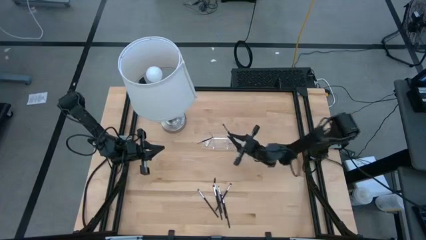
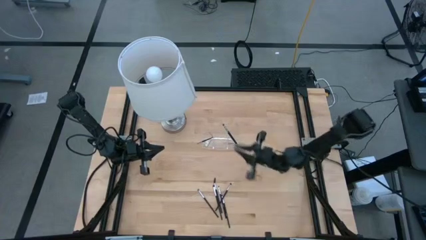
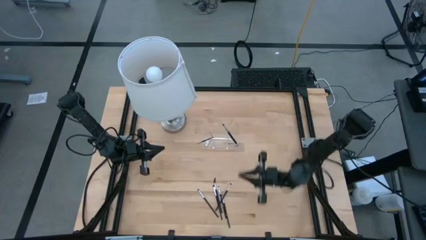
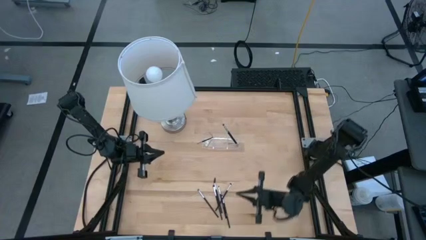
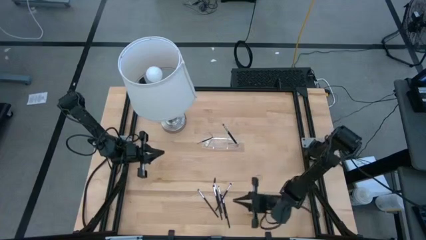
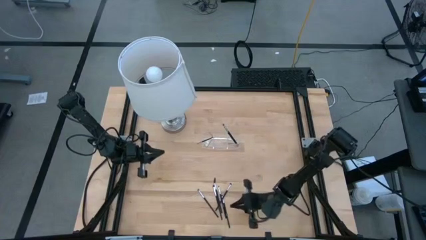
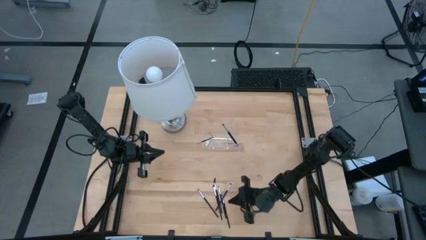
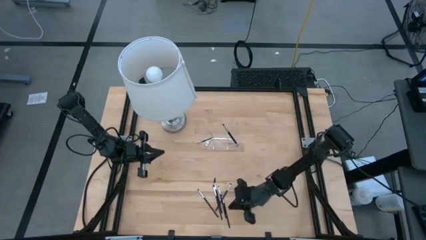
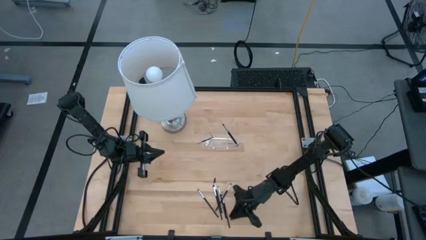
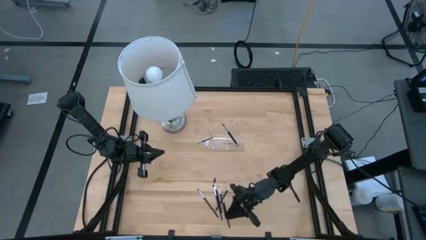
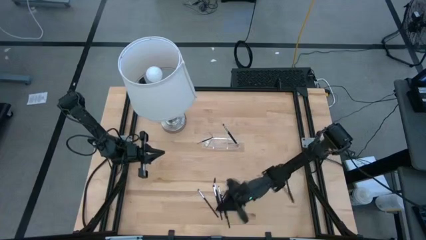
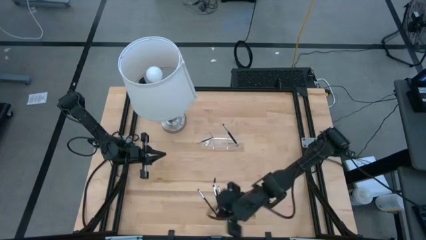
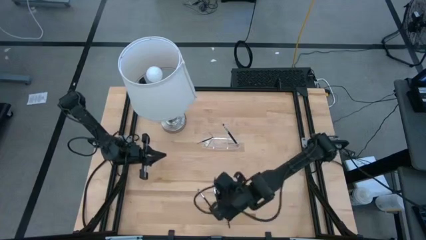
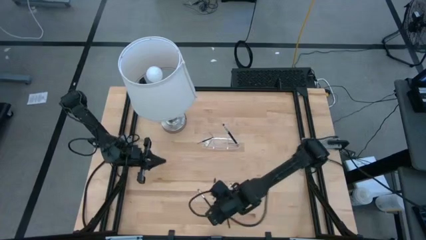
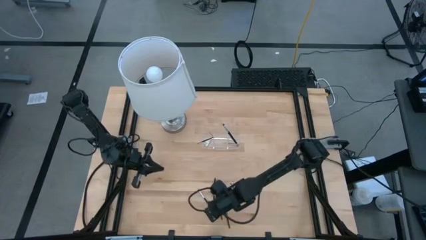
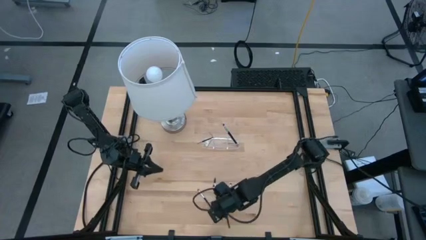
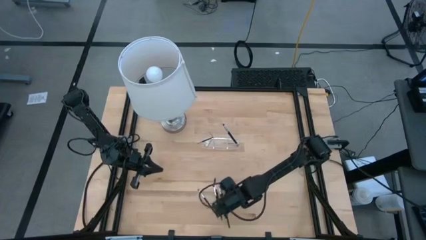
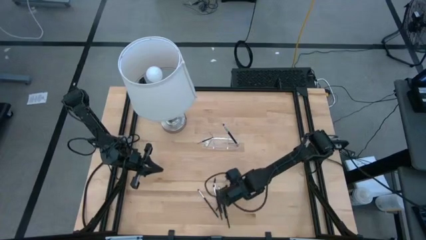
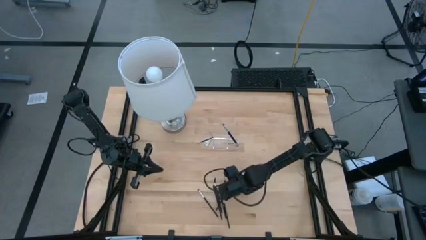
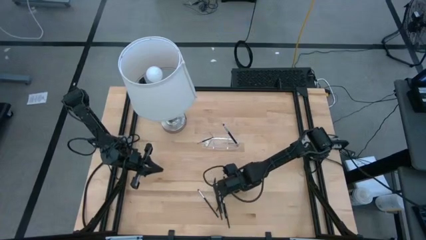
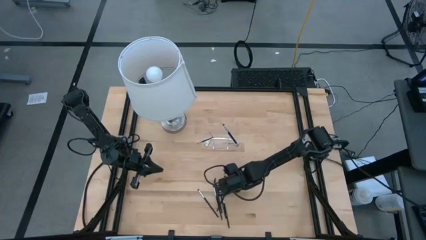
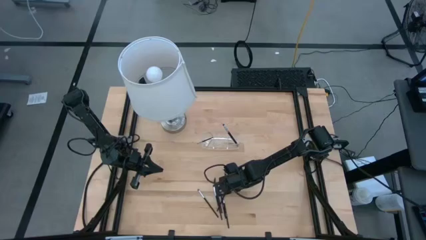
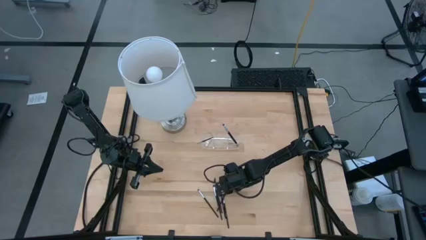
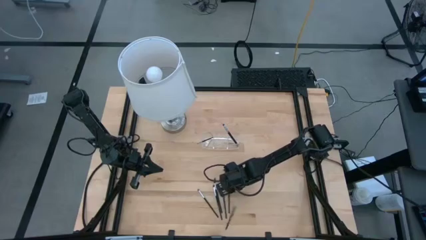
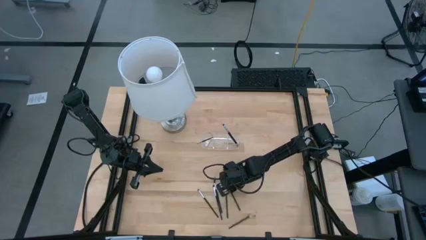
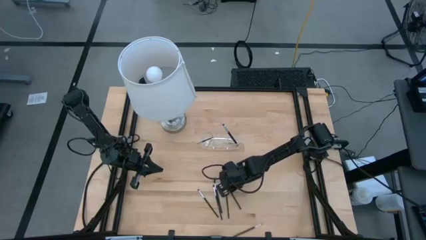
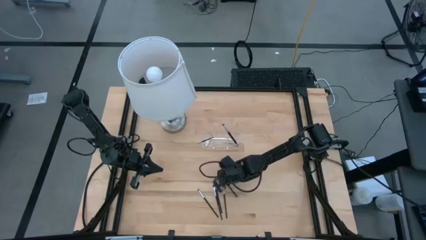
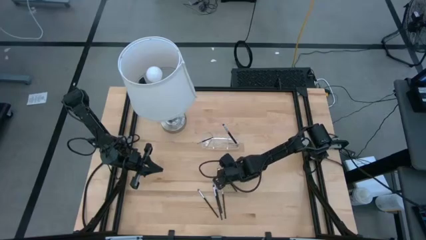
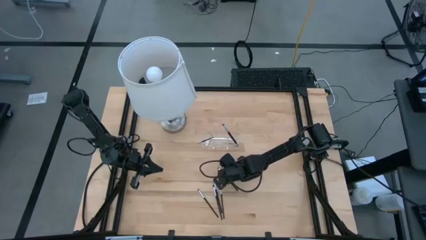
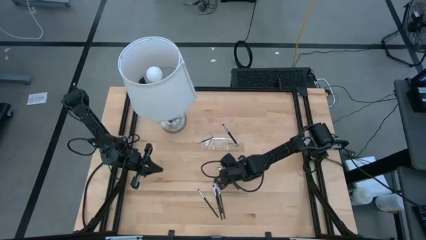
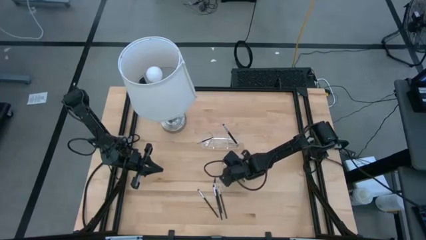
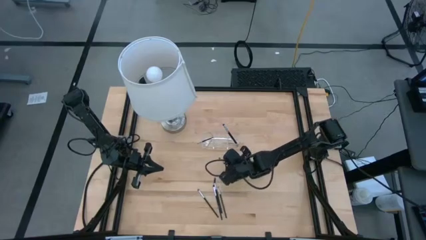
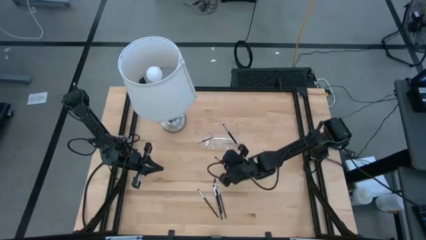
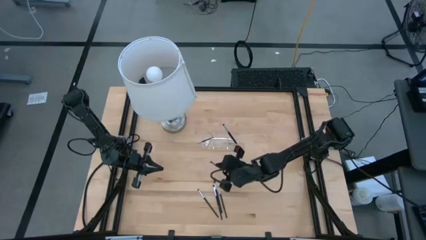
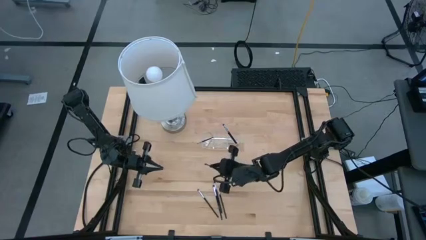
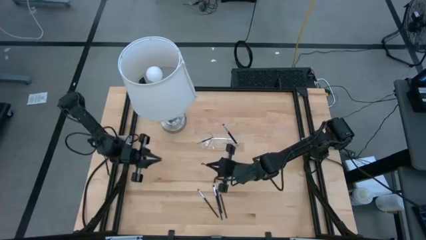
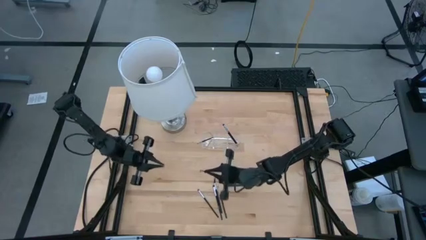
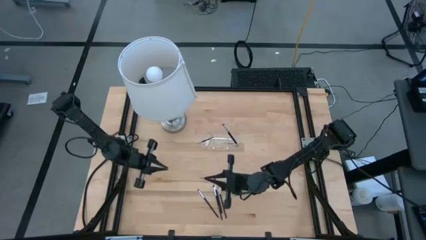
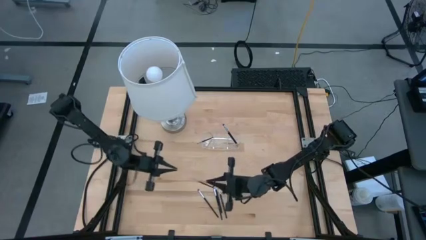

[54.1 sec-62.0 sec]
Task: Sort items
Put the eyeshadow brush into the transparent organizer

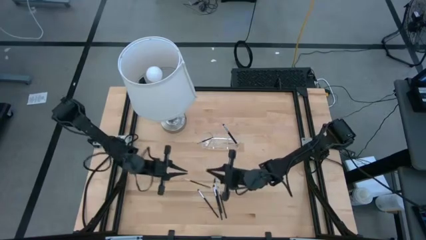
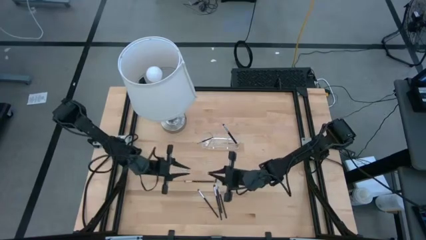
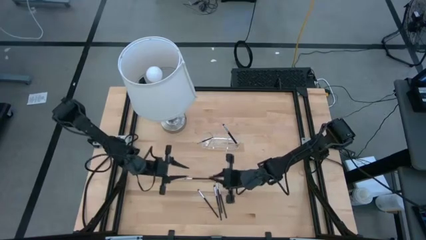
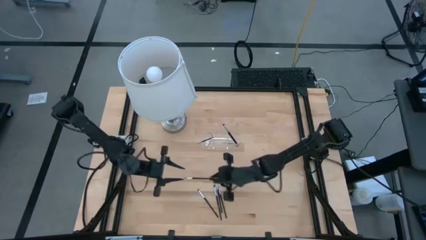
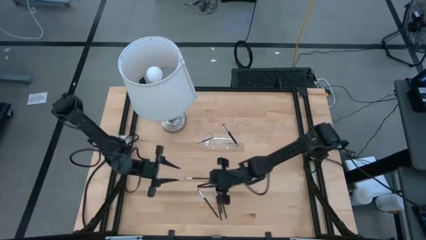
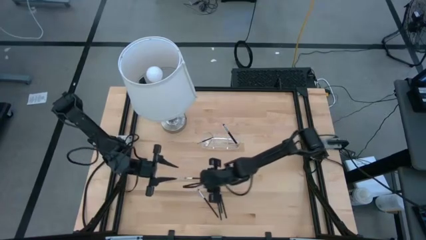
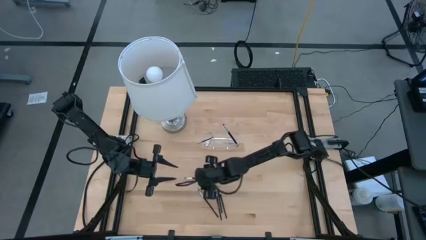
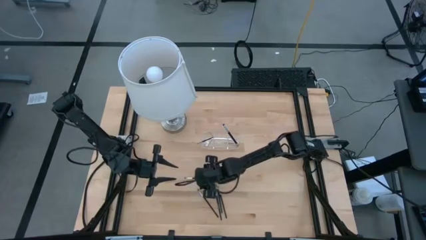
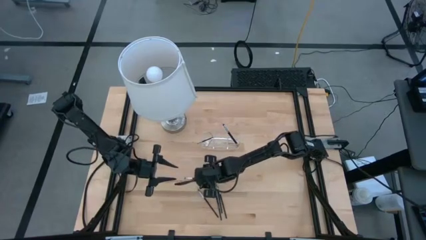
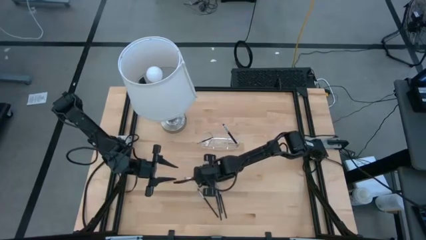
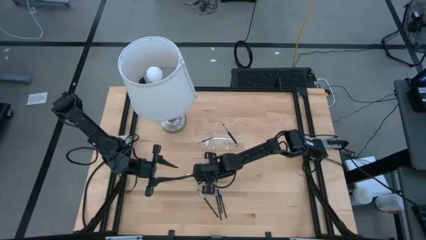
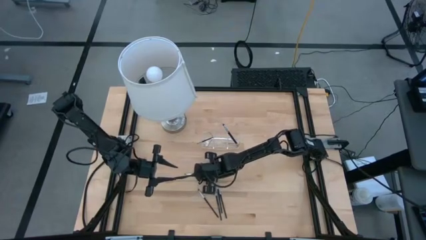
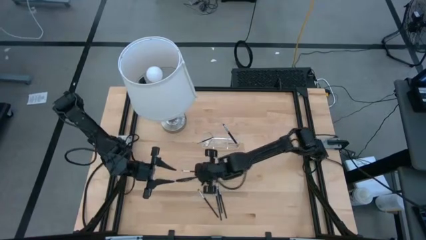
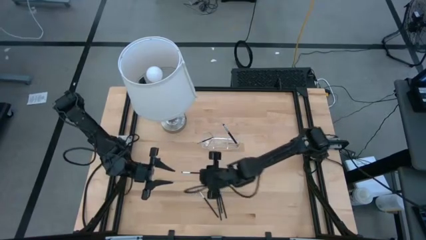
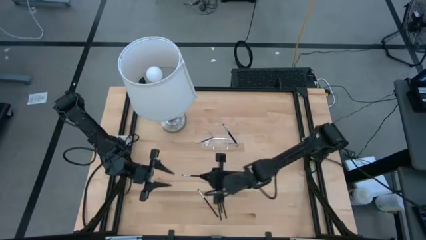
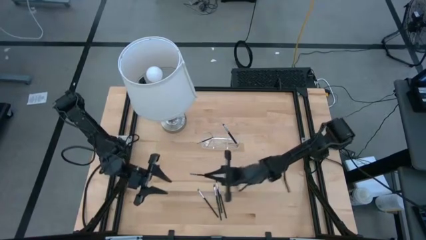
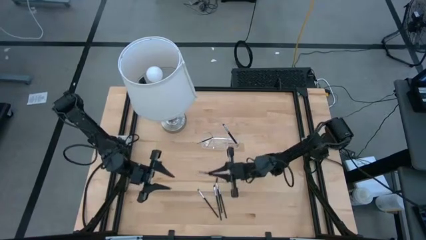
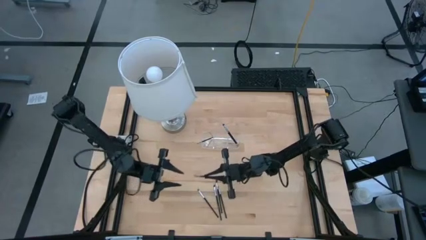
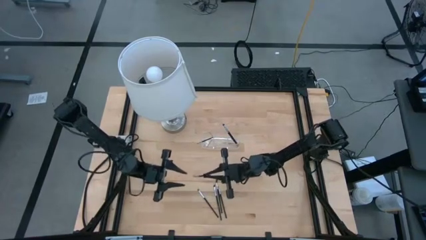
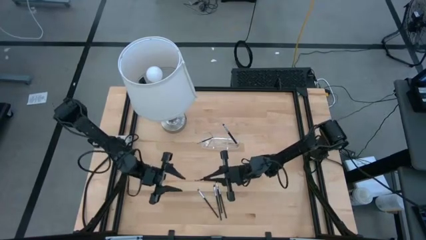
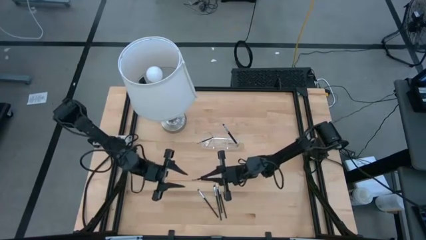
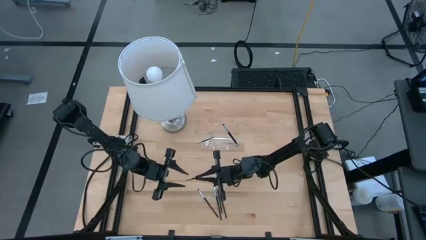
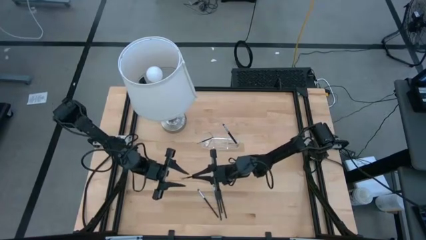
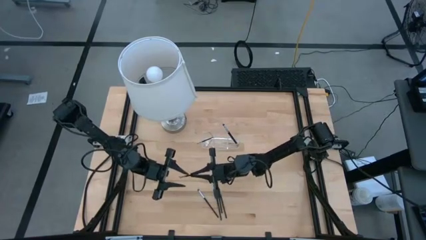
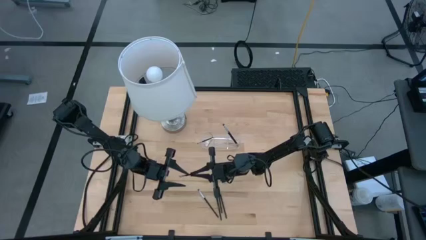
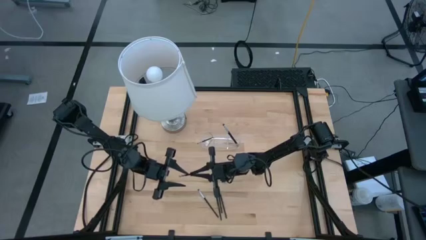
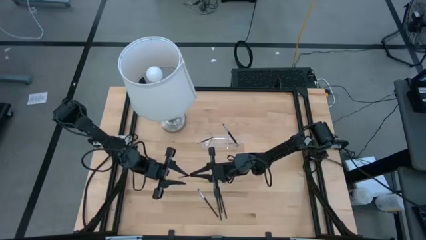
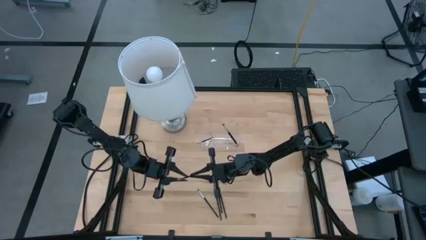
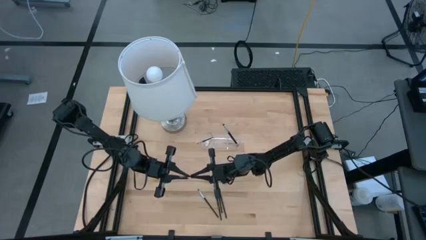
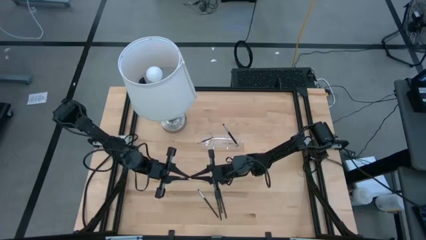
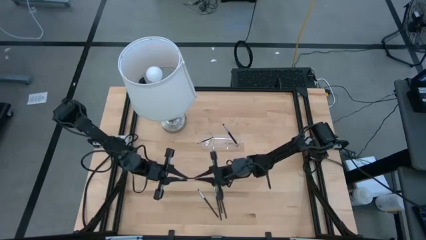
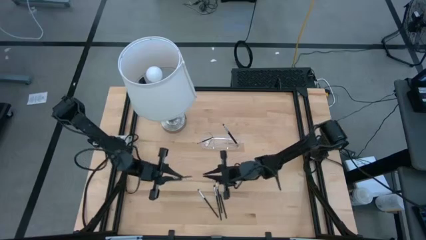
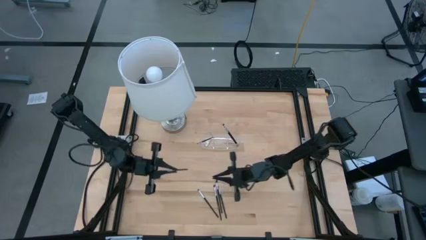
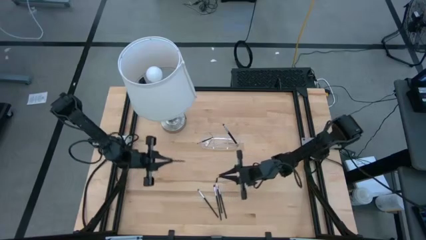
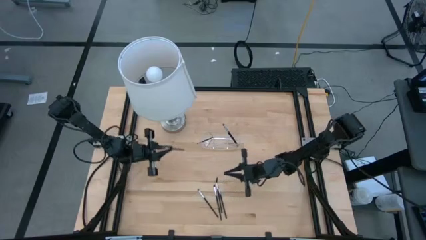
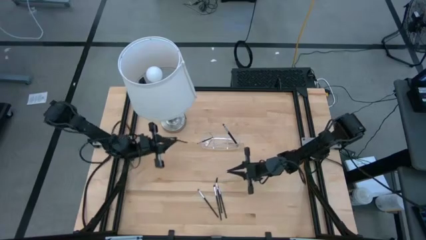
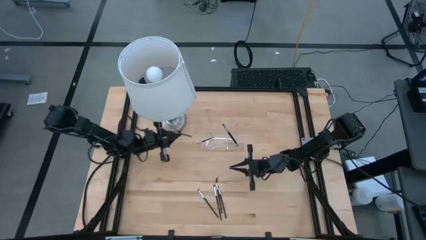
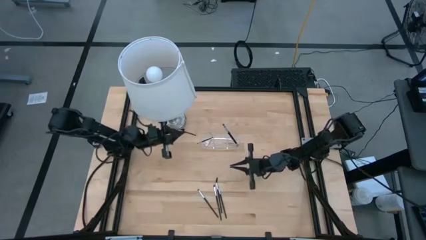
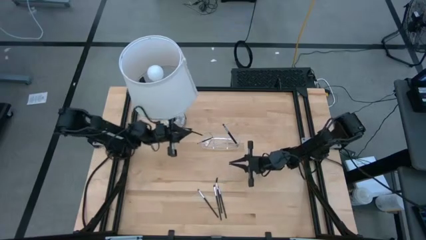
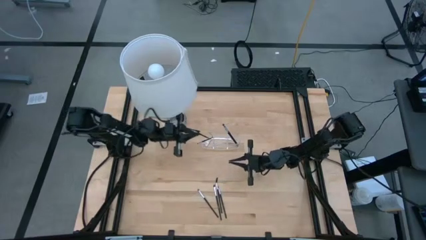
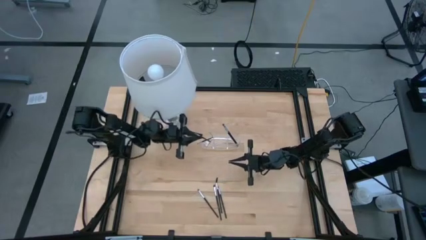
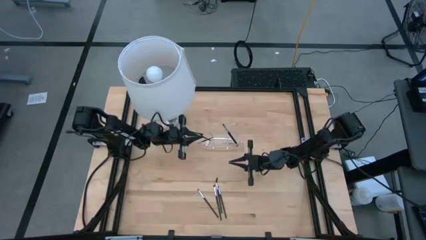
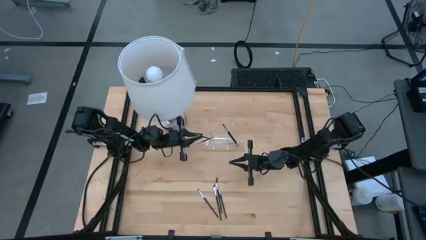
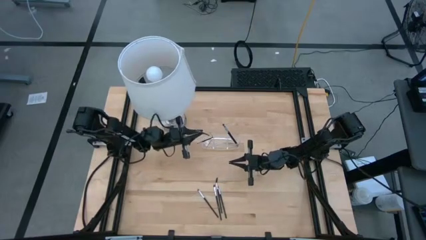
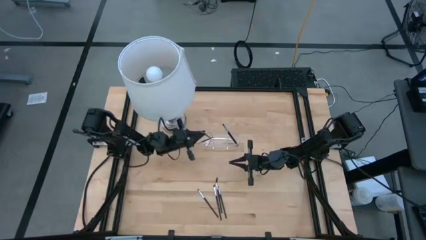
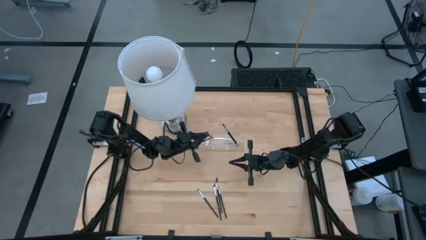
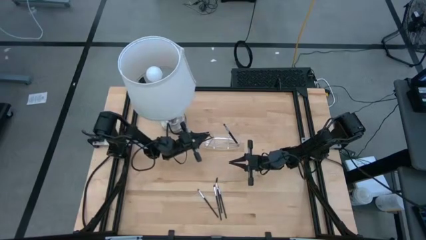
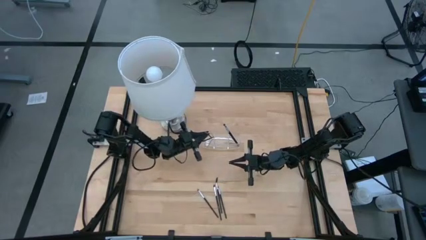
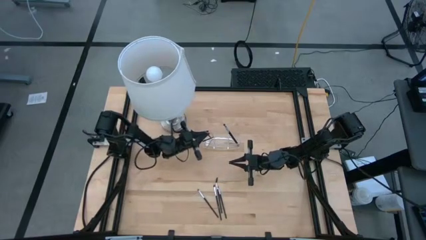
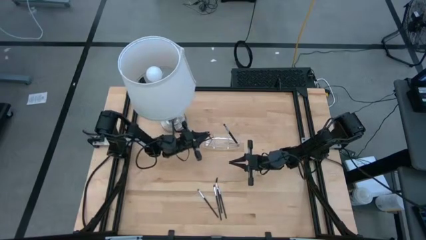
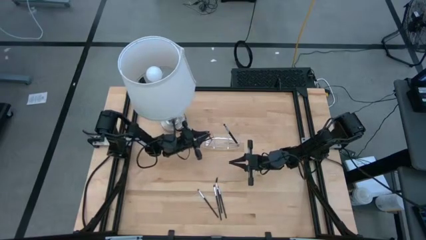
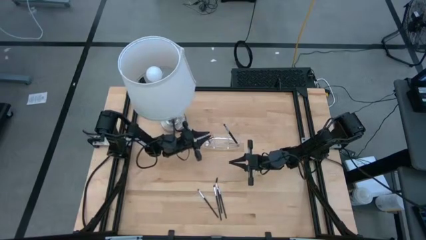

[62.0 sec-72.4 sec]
Put the eyeshadow brush into the transparent organizer
